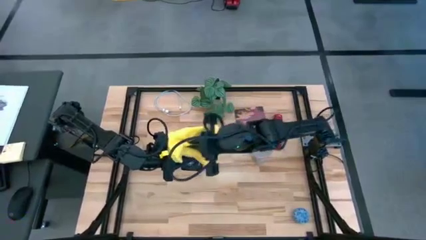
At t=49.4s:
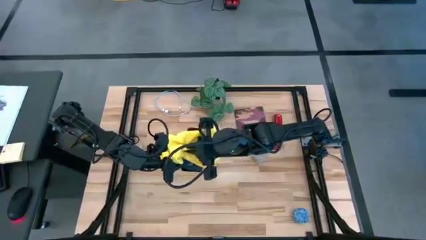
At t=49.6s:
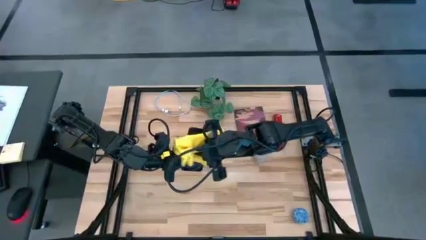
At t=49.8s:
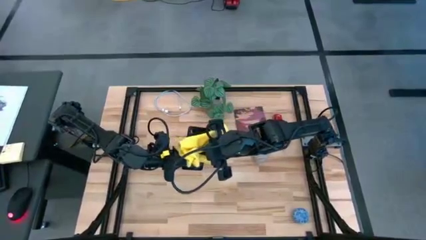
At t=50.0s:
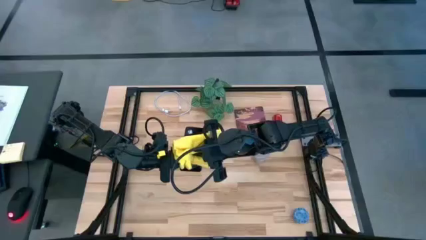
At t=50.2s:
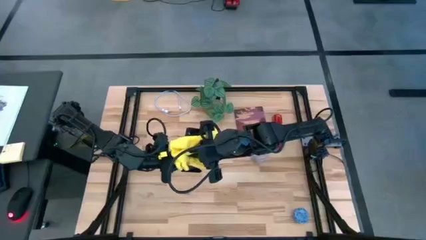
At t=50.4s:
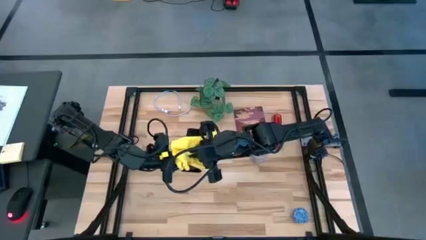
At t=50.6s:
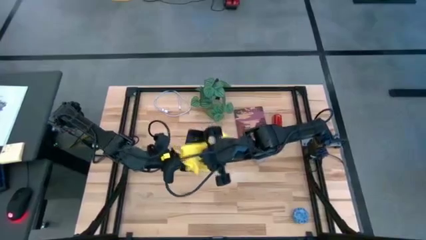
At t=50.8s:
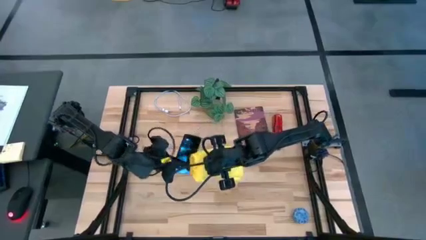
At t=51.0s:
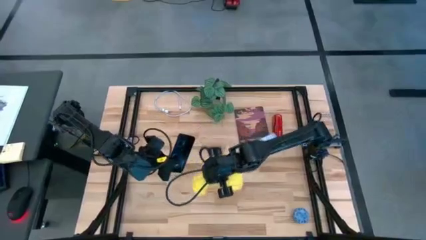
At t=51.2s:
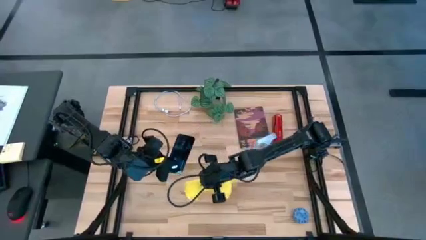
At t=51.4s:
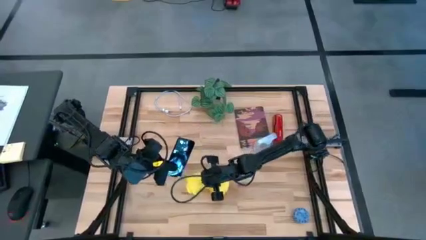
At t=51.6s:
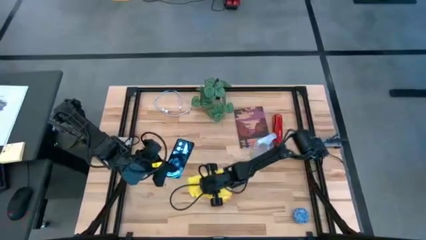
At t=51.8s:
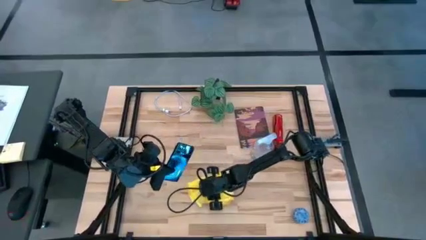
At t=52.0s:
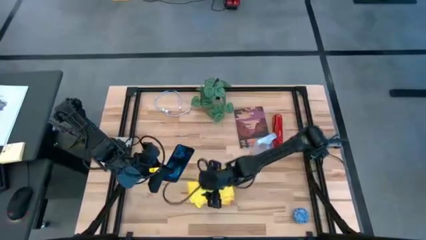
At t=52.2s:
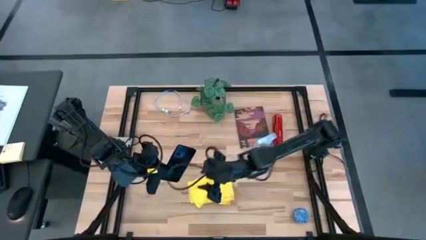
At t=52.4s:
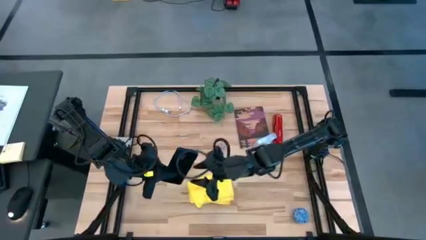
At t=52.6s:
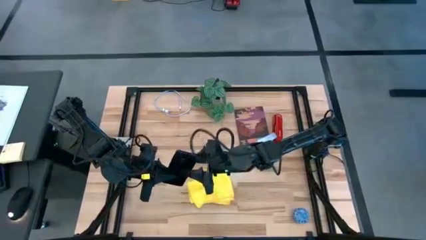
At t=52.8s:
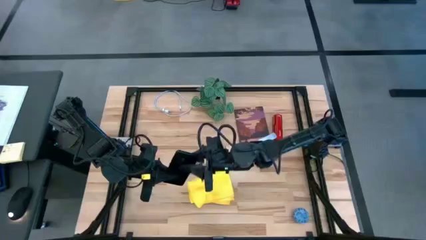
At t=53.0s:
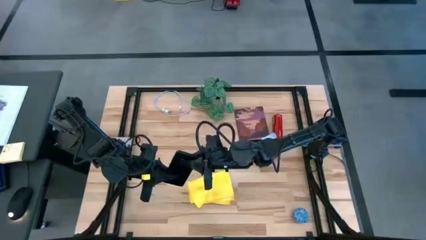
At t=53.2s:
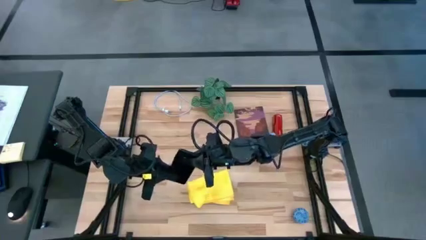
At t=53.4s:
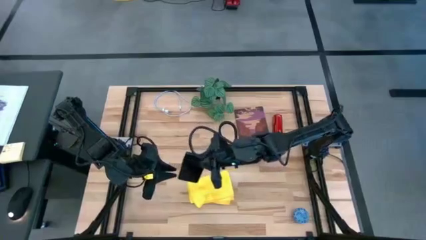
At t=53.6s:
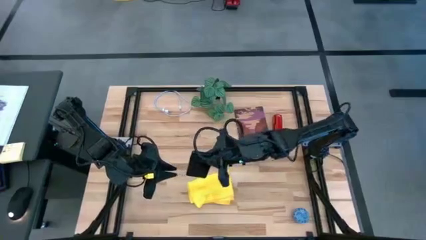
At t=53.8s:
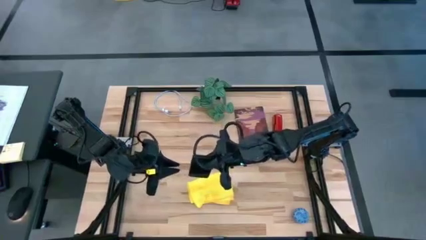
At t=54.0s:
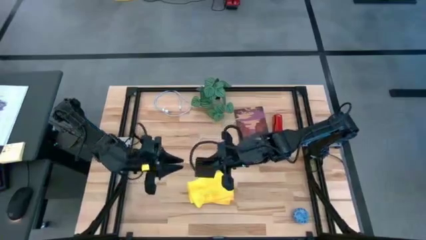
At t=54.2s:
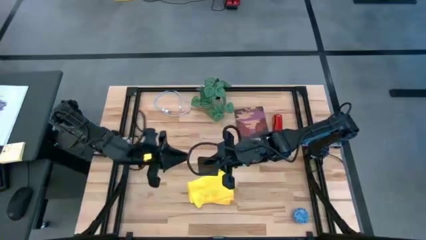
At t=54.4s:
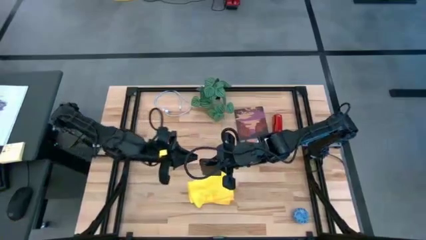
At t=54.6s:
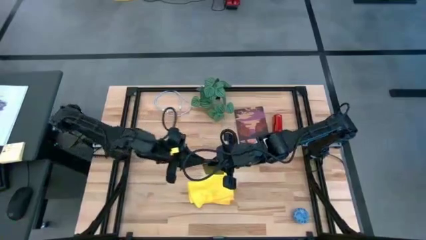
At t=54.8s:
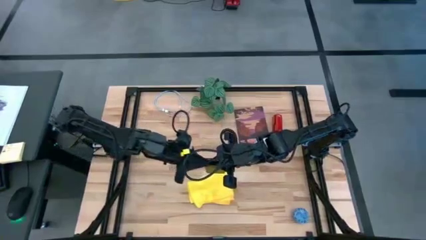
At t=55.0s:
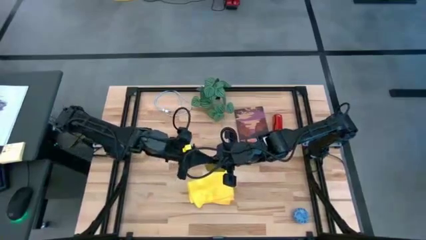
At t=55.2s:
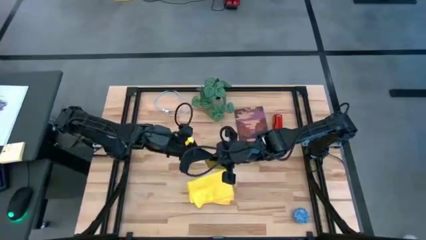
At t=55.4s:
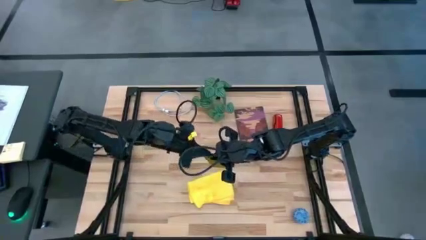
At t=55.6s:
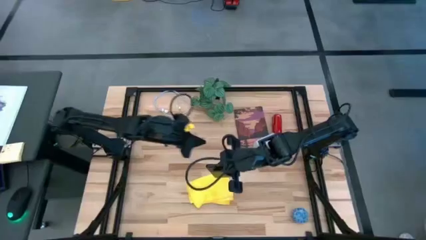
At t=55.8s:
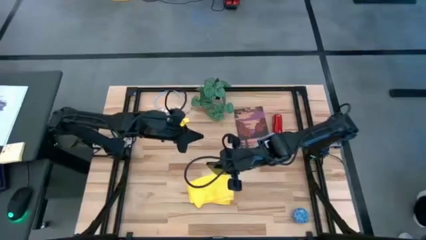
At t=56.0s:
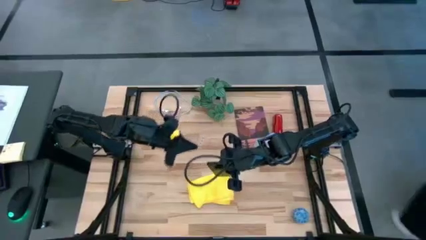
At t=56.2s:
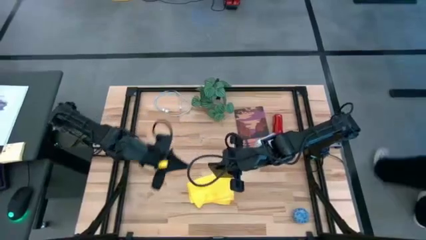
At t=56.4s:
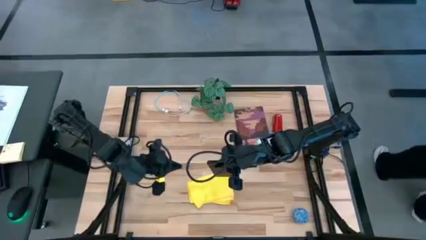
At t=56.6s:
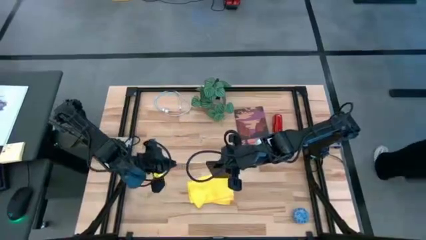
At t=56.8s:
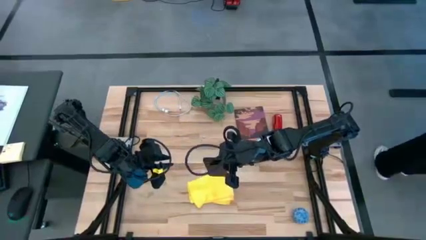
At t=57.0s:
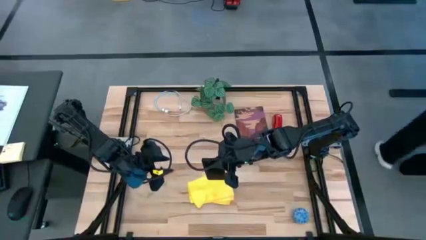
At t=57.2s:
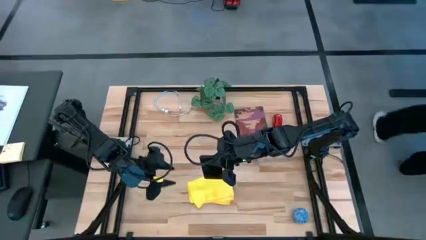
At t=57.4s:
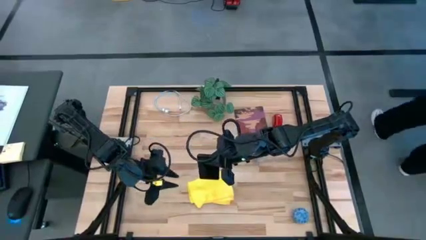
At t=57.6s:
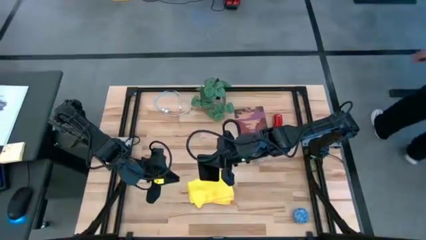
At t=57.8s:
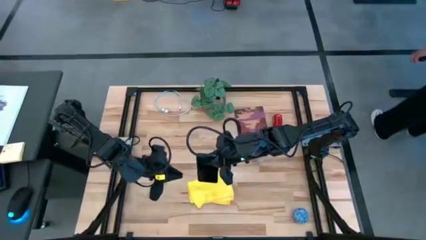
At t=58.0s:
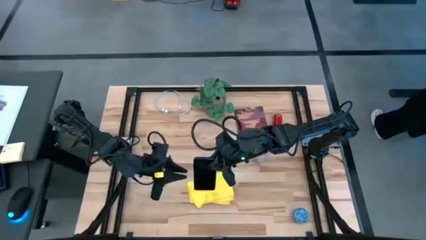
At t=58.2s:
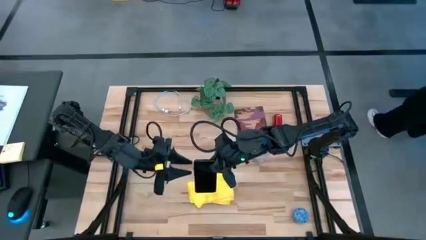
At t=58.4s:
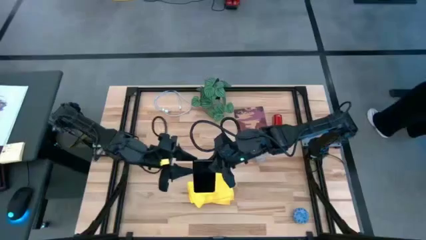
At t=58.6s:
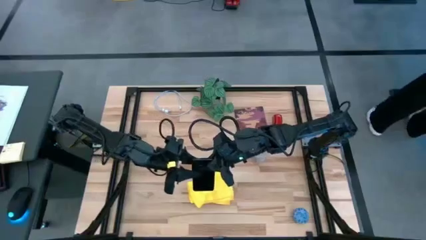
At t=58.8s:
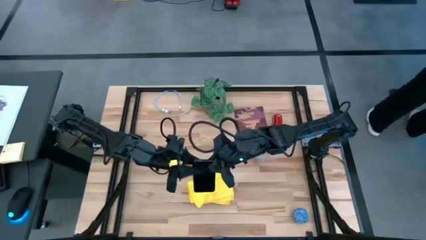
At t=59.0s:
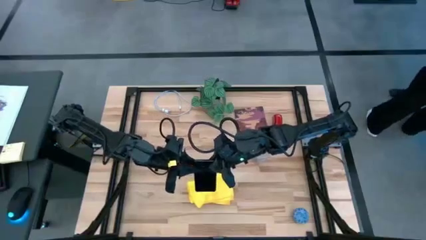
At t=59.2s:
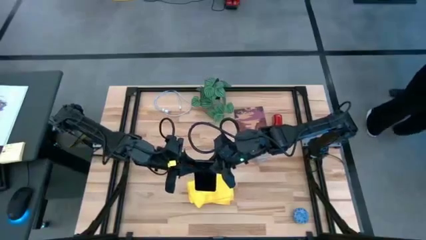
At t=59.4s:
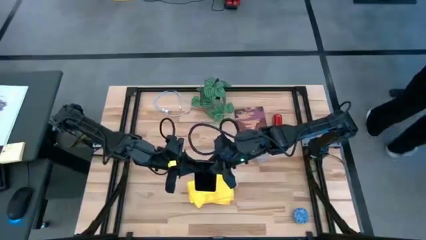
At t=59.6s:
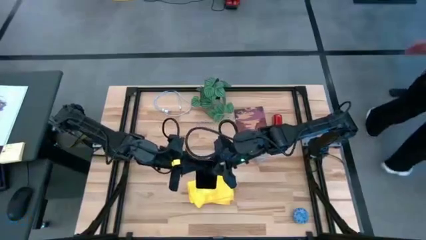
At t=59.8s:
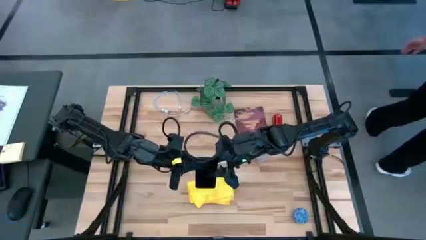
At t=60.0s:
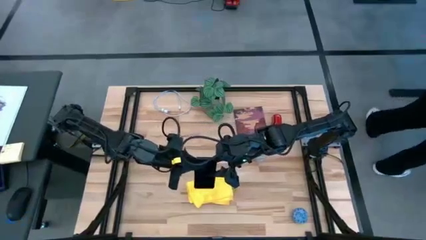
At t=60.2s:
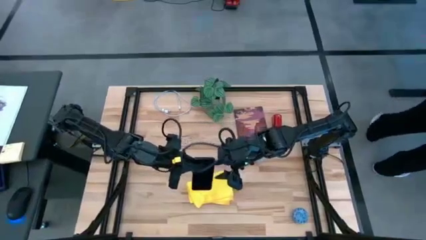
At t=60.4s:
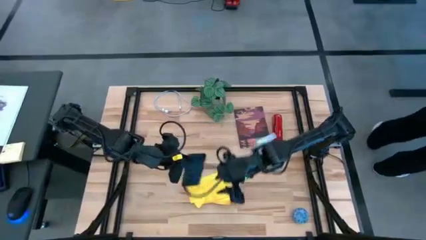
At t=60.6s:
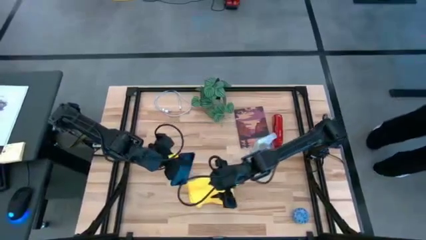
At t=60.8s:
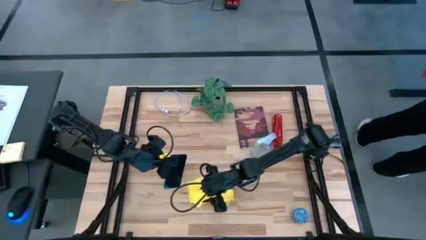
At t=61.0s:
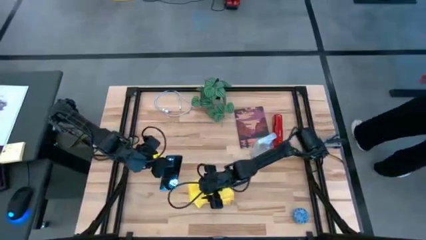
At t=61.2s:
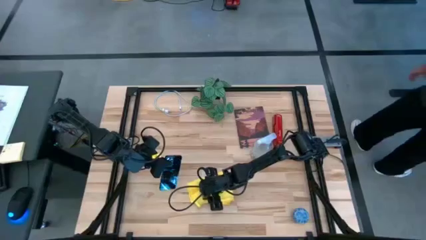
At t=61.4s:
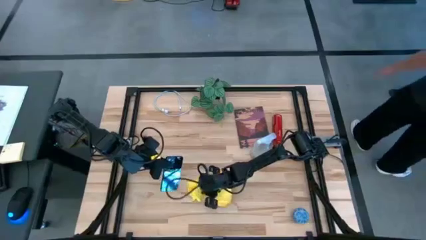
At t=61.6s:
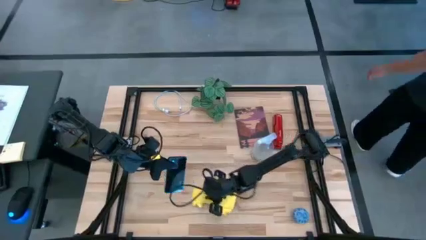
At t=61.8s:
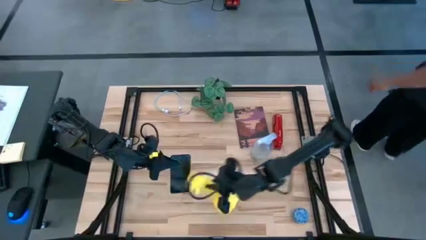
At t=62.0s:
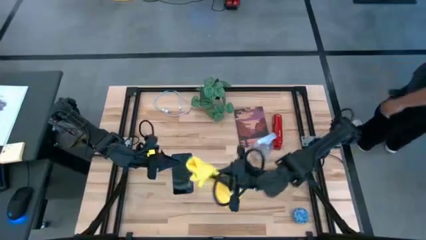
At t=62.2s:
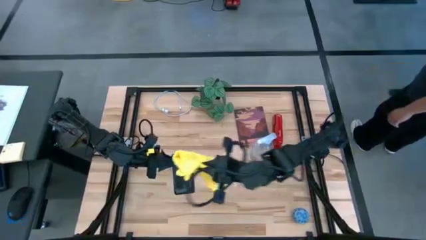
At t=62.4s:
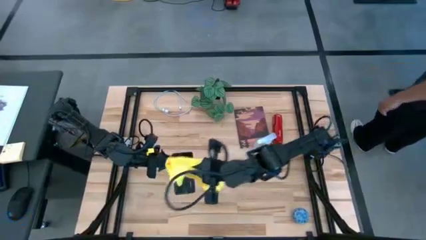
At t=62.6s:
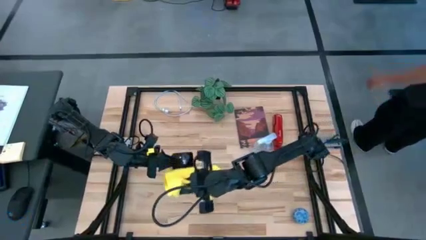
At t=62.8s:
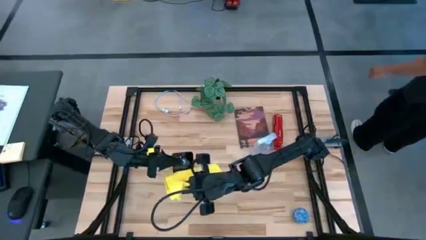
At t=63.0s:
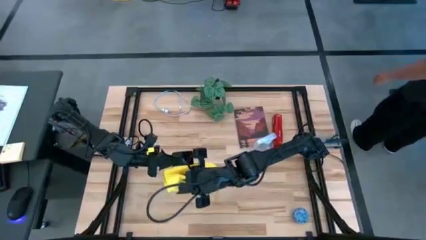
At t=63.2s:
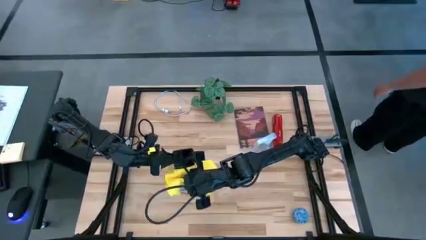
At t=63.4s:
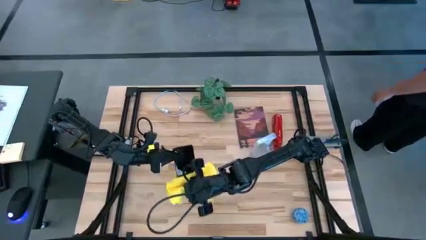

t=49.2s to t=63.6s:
Task: Apply microfiber cloth
Wipe the back of the cellphone with the yellow microfiber cloth

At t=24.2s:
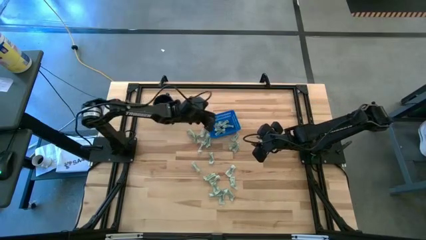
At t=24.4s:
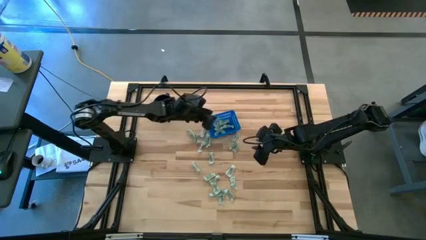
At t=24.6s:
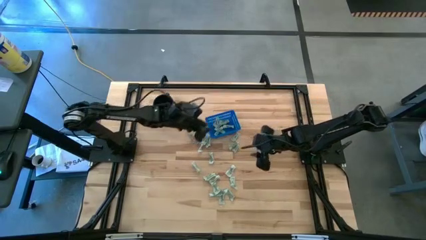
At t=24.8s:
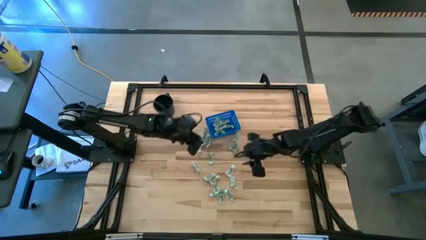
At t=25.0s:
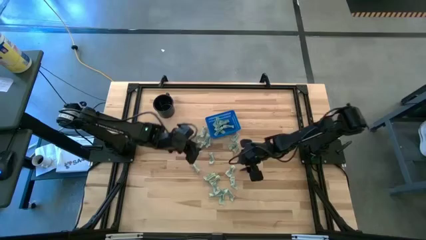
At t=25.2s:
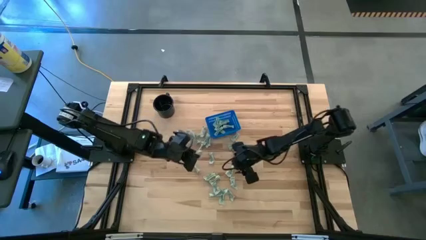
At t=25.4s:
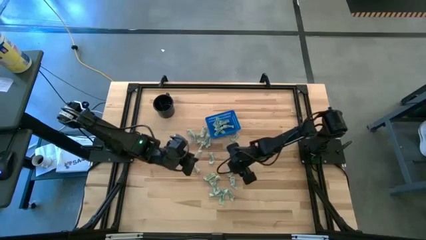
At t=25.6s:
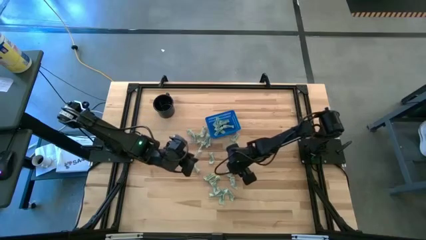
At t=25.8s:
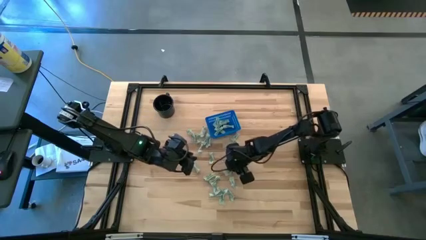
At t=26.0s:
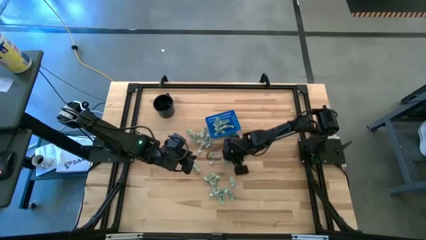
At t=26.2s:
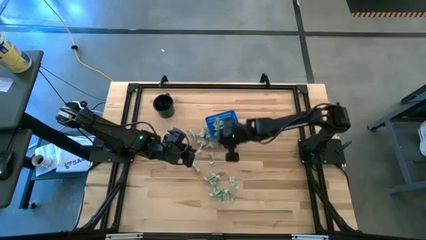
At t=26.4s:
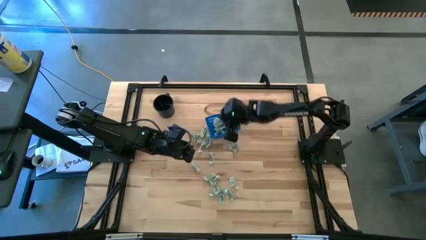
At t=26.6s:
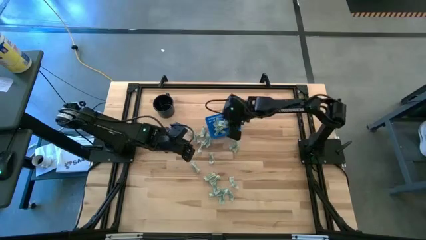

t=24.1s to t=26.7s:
Task: Pick and place Stevia / Truvia into bins
Put the green stevia packet into the blue bin
